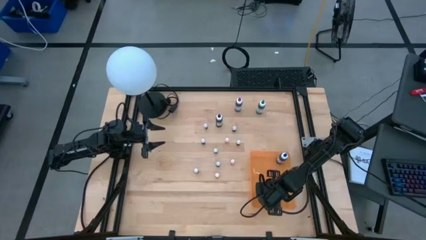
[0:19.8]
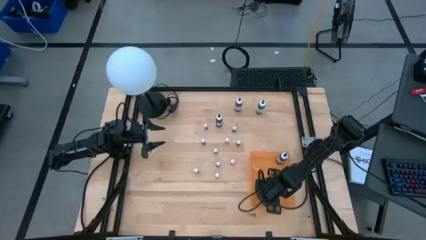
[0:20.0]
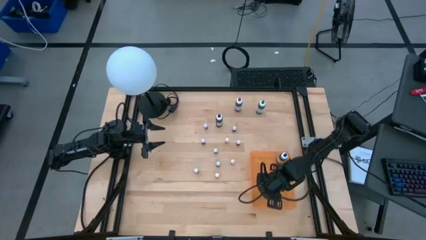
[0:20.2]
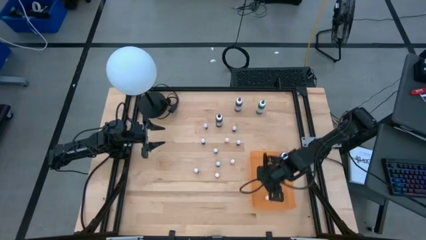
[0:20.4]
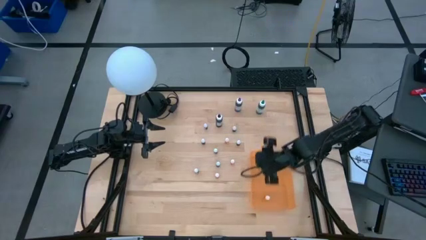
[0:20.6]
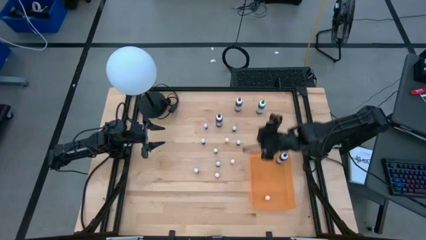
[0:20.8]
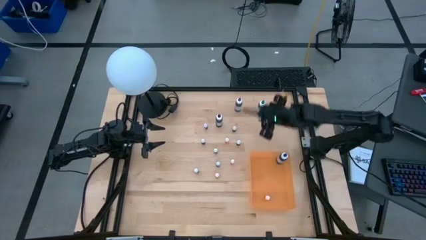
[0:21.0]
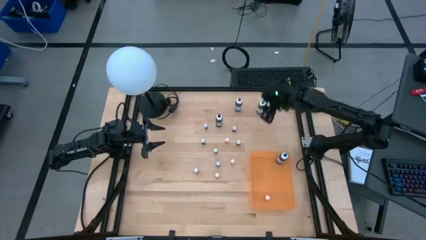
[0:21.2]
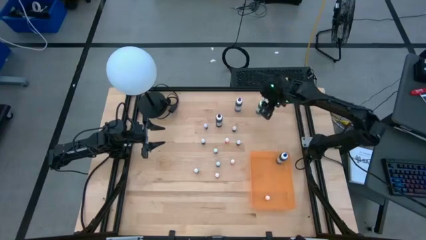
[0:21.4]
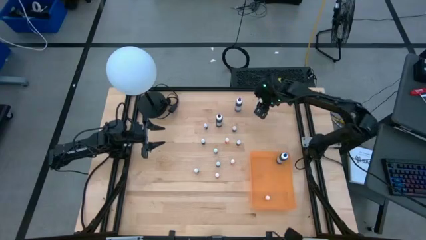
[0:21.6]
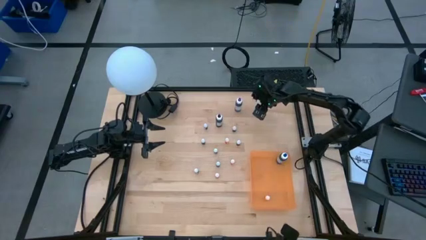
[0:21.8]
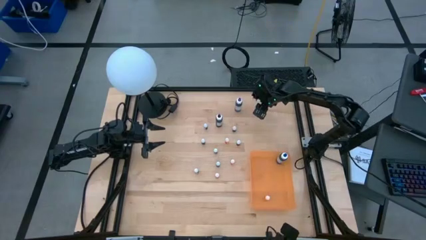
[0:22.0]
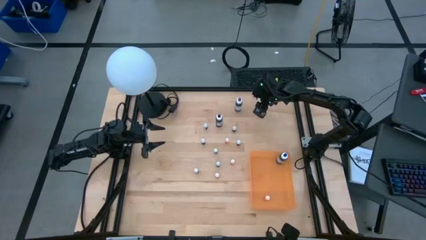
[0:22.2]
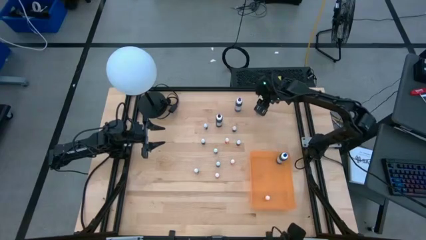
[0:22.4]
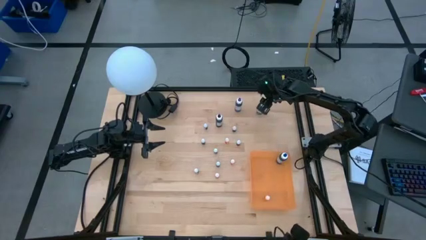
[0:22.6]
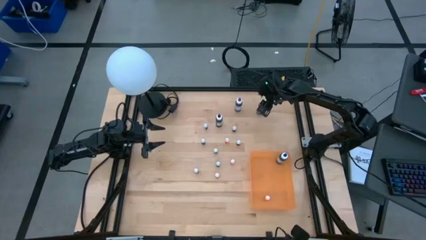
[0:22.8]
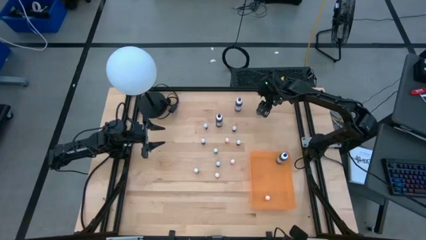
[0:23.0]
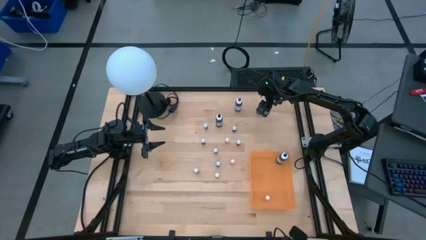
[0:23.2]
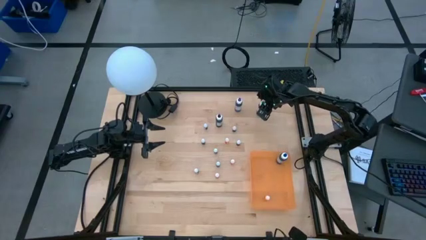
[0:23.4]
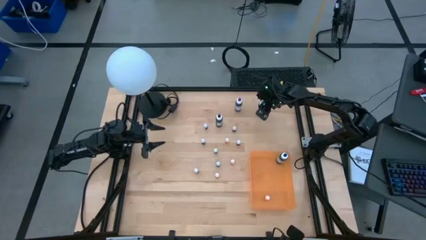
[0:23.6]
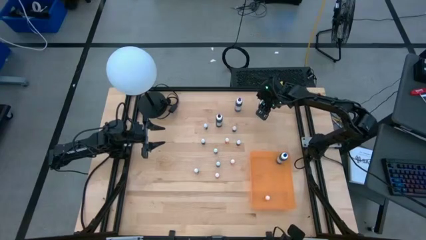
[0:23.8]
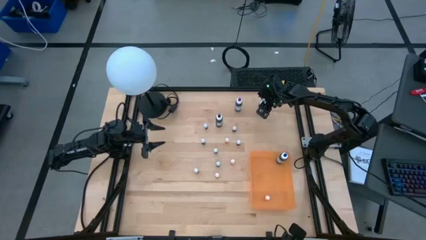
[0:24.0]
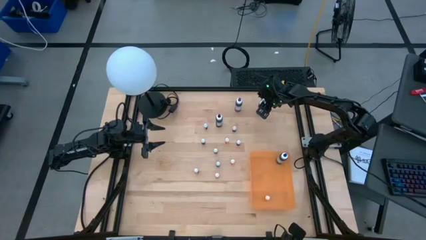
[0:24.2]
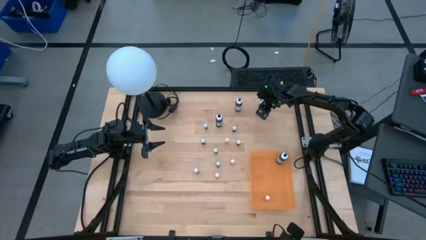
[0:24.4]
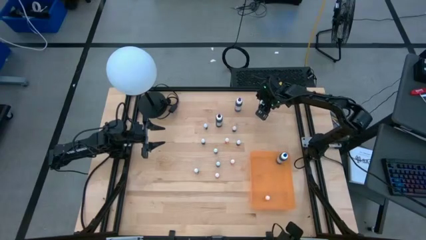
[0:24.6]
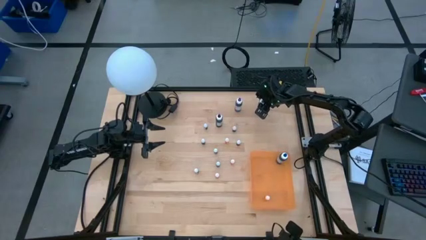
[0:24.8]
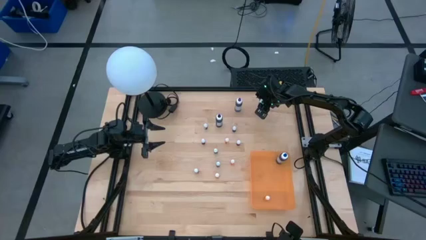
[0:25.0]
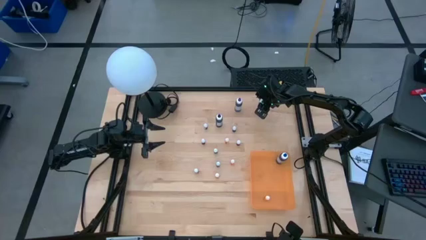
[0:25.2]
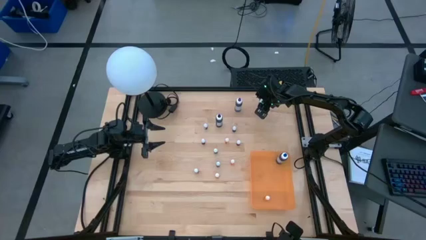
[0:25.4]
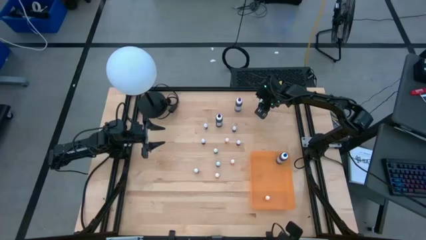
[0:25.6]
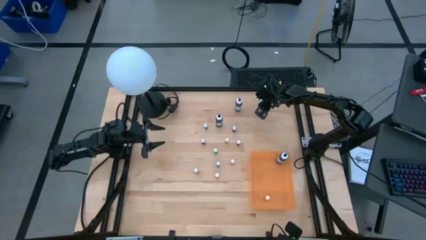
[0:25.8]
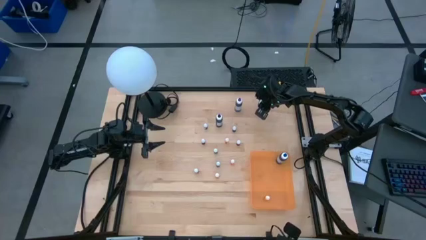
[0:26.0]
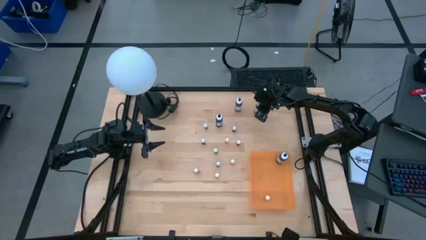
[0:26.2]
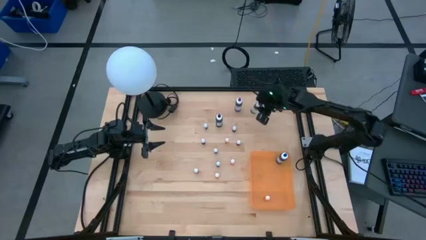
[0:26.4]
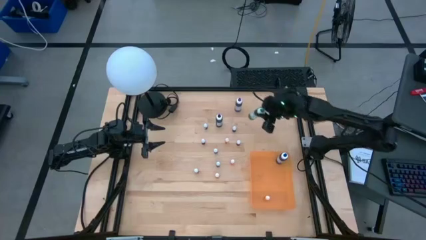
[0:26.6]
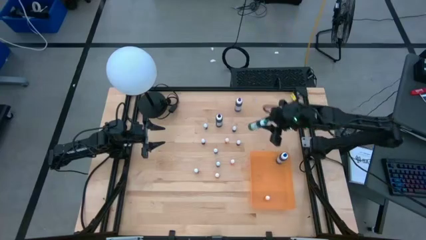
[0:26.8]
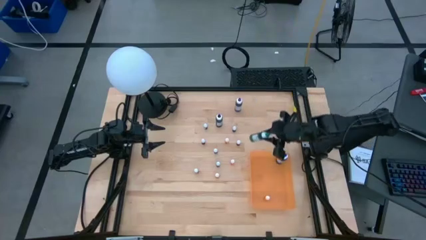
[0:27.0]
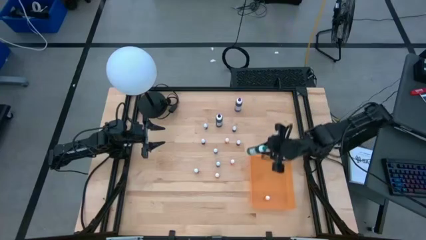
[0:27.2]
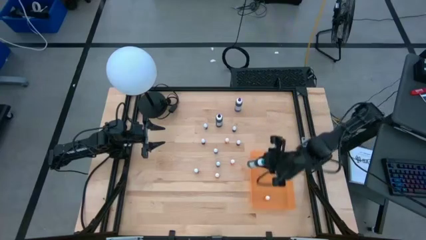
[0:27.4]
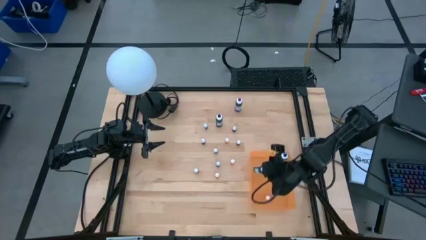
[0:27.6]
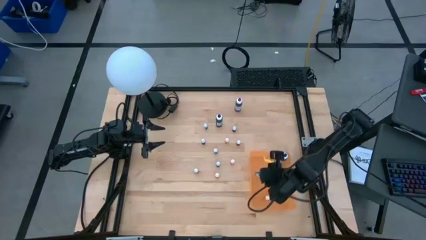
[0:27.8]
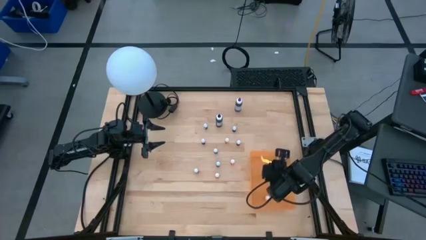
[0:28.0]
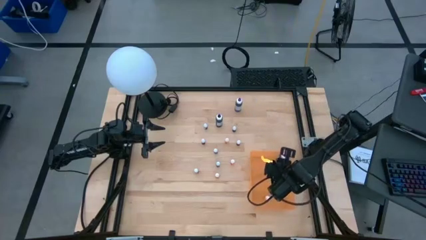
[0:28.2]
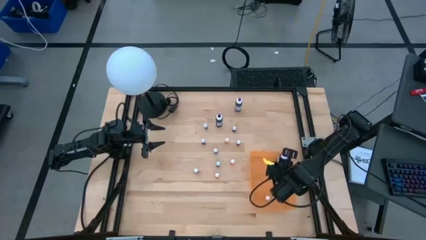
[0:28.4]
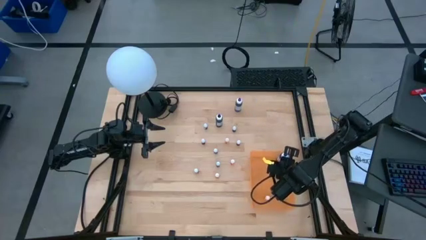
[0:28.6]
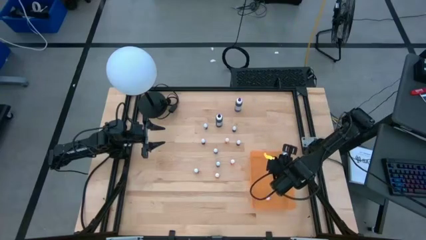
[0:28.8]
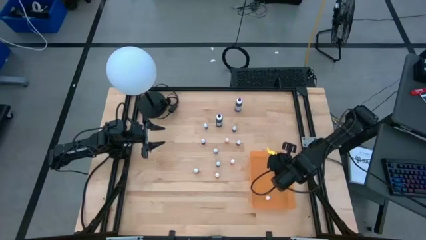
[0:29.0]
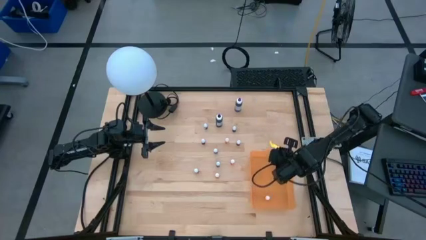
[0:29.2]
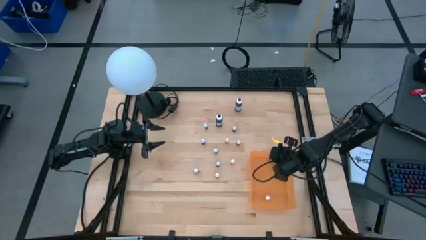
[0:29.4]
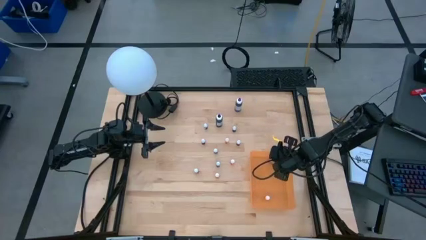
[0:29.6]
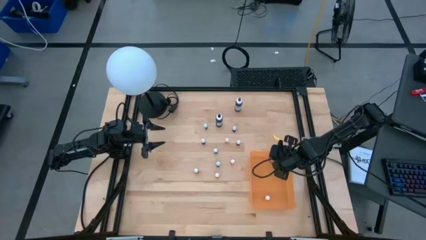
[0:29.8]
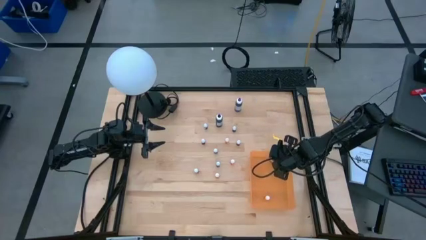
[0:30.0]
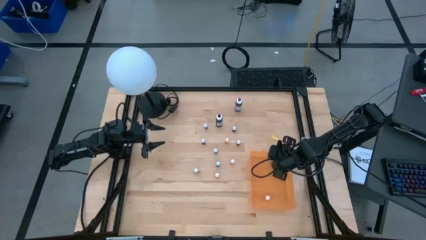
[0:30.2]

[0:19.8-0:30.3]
Task: Pick & Place food coloring
Put the big green food coloring bottle into the orange bin

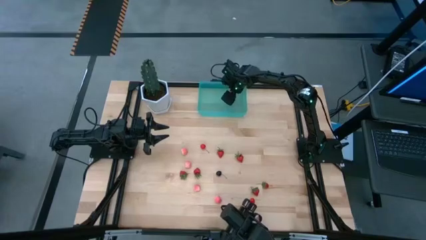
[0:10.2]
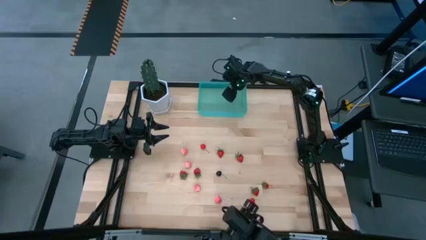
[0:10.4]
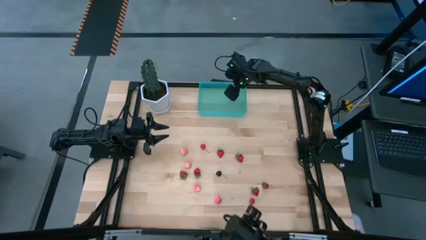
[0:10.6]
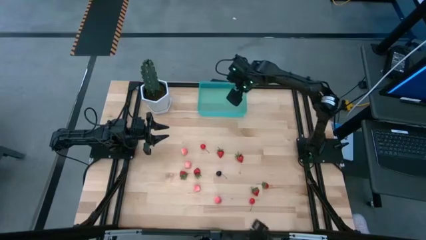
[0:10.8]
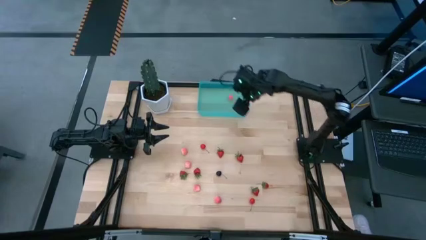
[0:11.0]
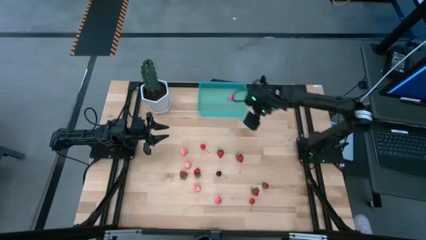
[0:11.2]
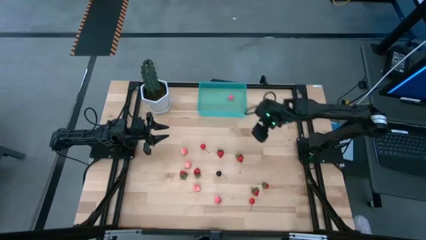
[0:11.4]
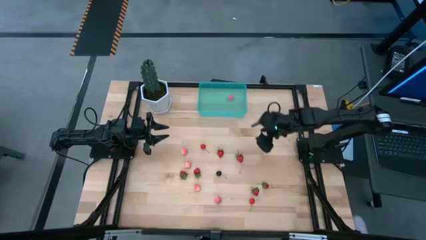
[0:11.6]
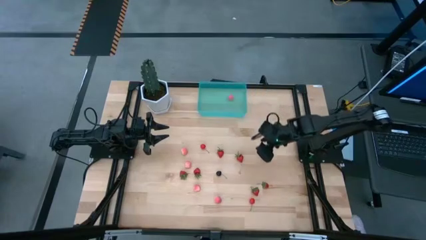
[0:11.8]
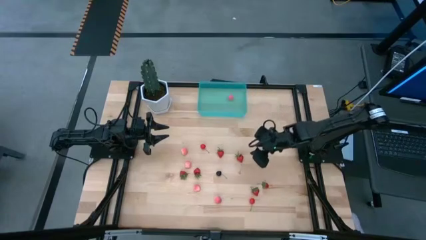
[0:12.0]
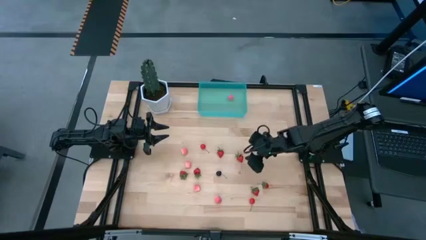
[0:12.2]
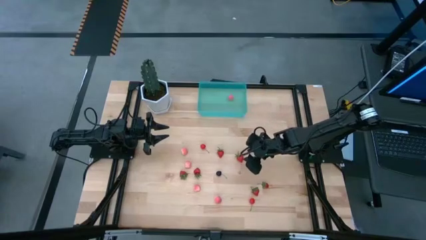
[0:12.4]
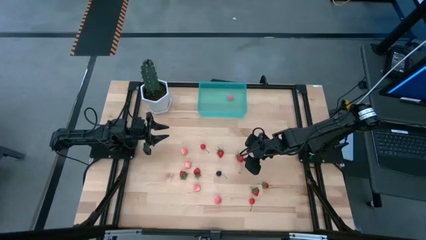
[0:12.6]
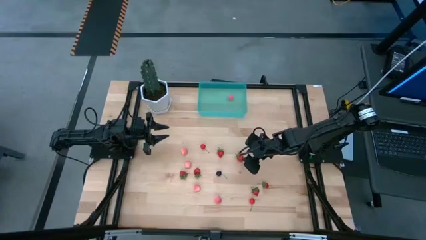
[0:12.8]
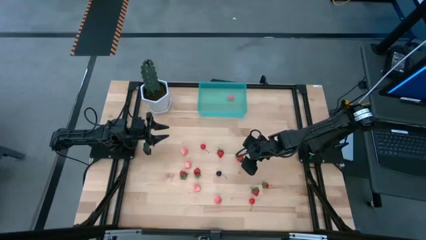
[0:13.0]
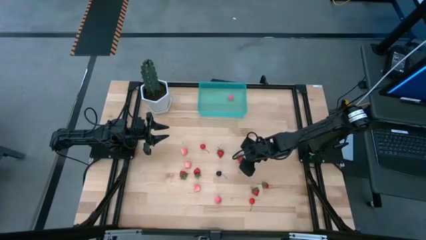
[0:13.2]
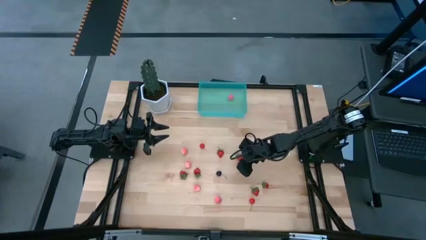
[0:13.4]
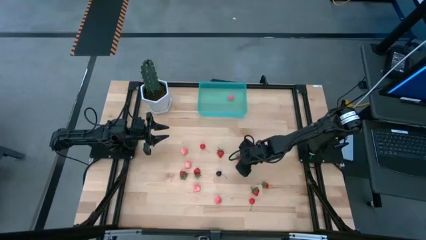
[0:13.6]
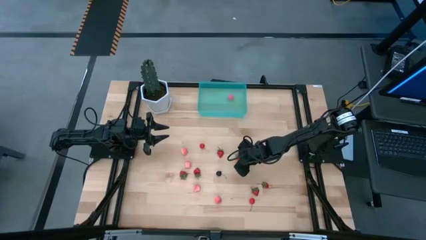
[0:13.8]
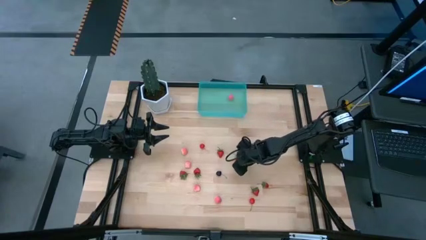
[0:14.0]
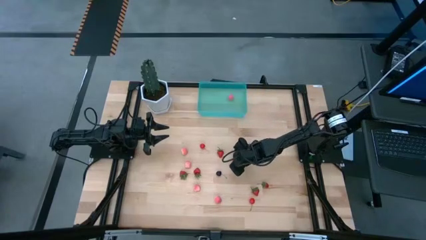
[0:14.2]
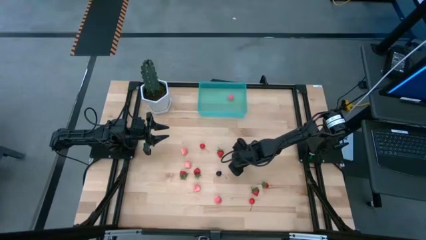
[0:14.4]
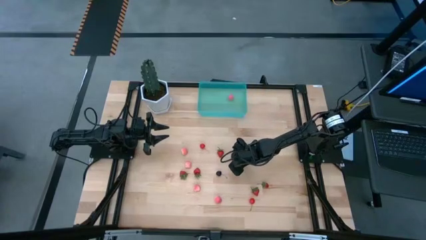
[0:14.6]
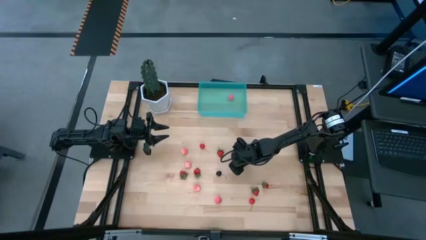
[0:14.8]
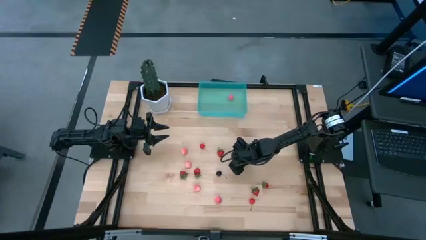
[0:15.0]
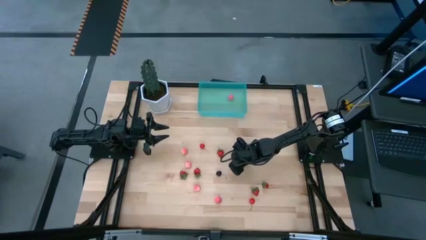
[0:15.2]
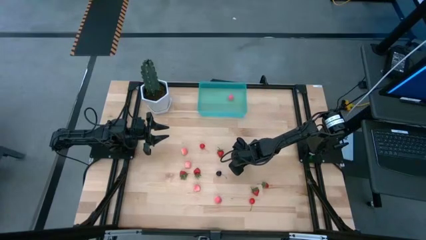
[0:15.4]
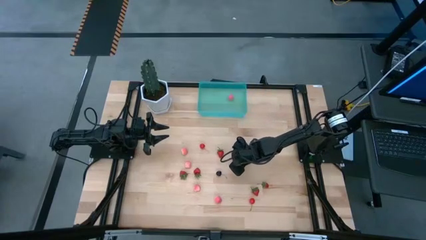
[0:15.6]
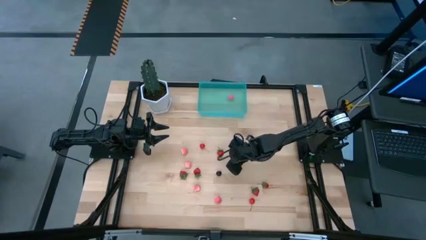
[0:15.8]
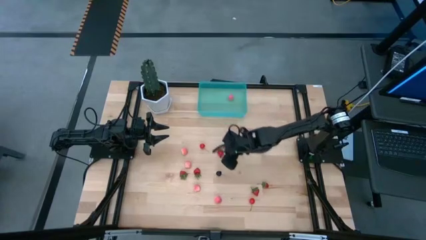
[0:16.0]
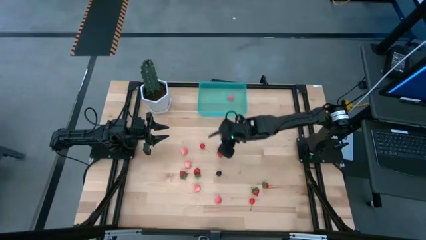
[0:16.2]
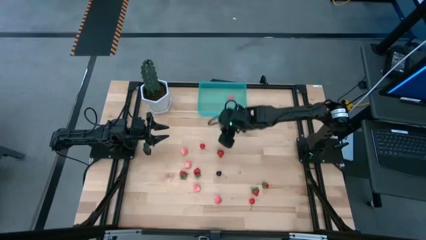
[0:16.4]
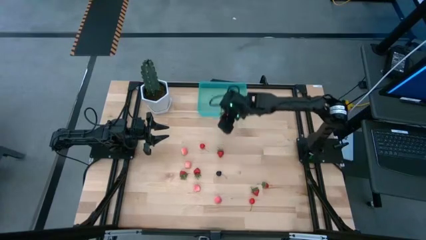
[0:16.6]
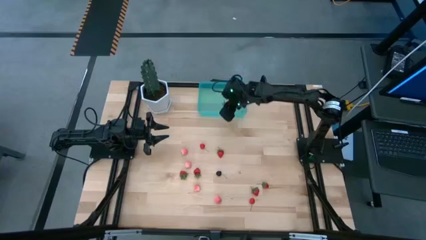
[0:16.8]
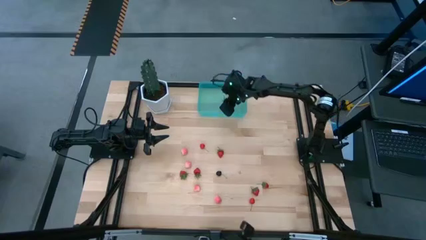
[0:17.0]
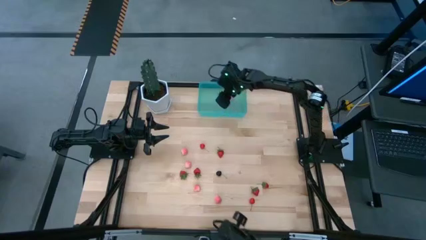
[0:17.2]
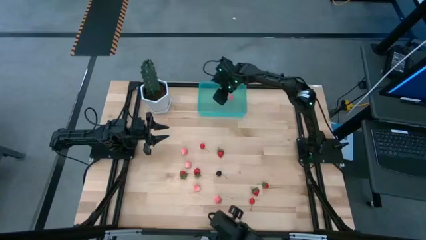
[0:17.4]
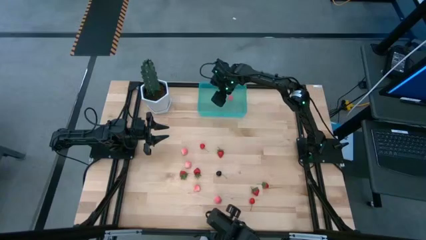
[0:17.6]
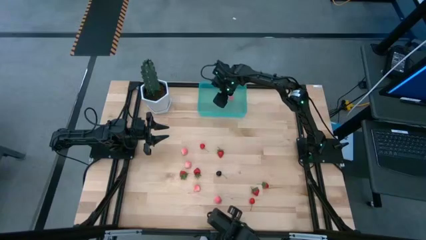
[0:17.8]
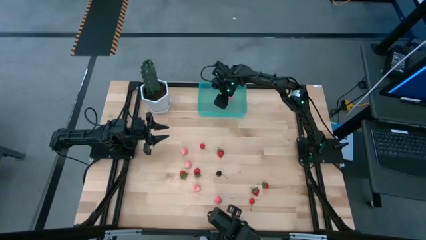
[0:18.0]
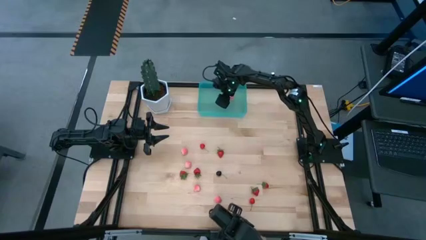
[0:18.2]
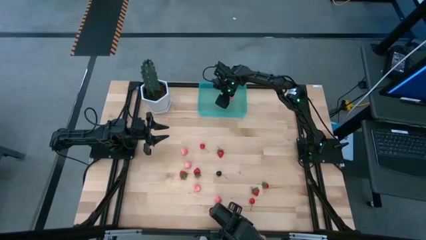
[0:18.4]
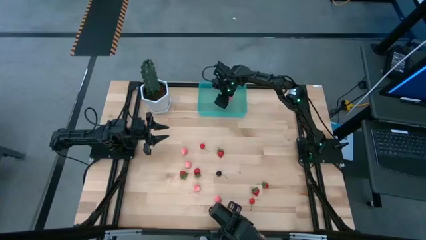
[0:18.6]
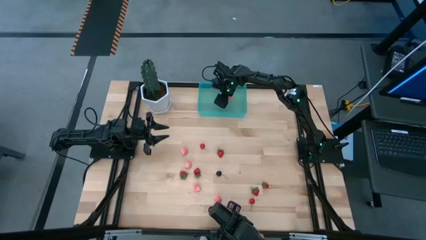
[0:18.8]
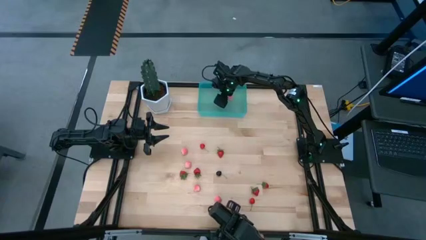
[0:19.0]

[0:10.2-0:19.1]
Task: Pick and placing Produce into tupperware
Put the strawberry into the container
